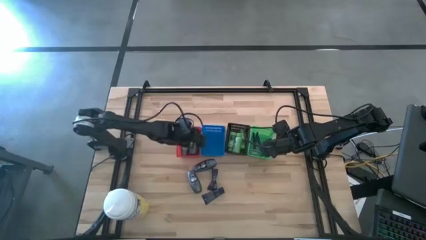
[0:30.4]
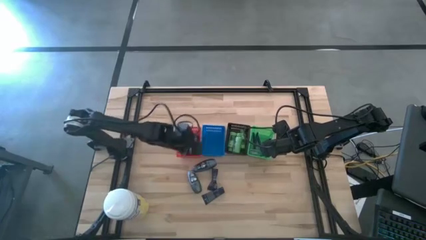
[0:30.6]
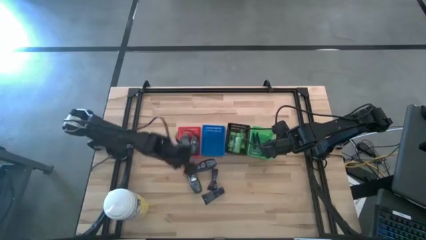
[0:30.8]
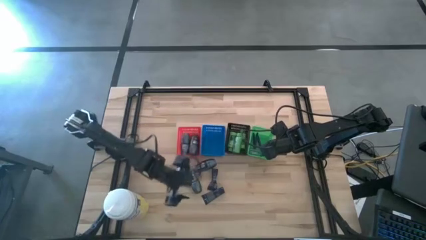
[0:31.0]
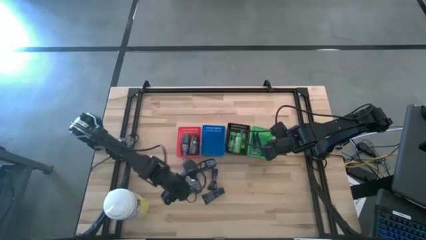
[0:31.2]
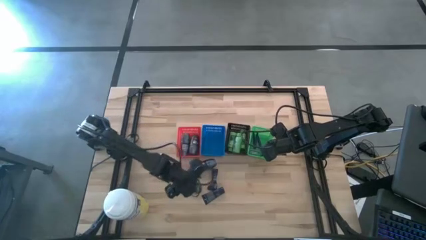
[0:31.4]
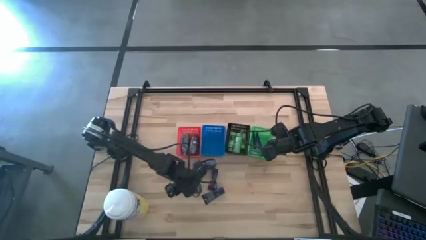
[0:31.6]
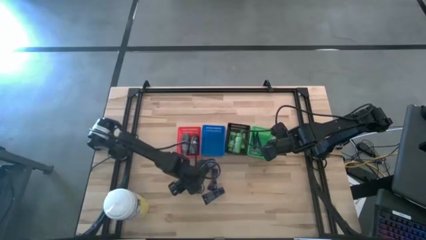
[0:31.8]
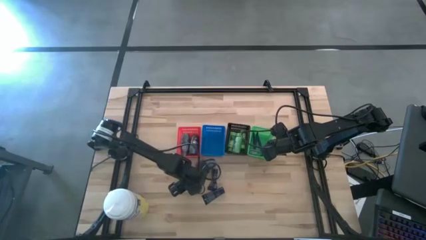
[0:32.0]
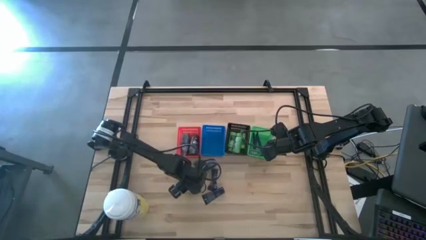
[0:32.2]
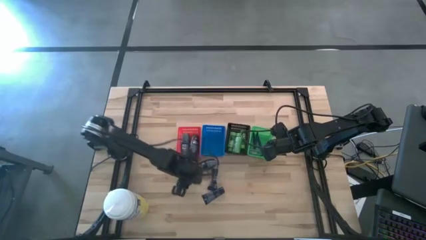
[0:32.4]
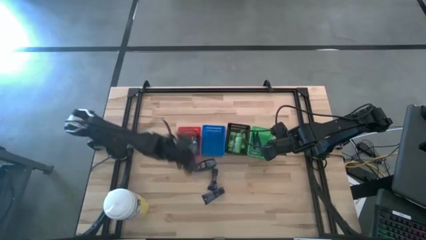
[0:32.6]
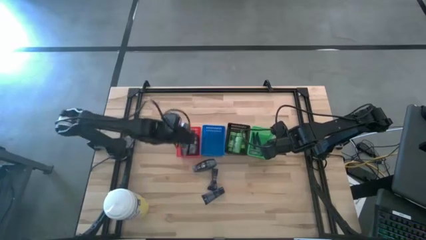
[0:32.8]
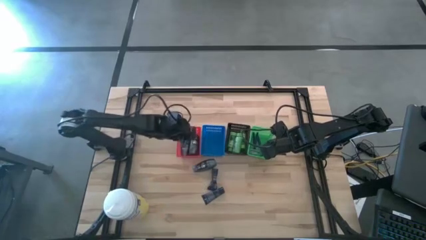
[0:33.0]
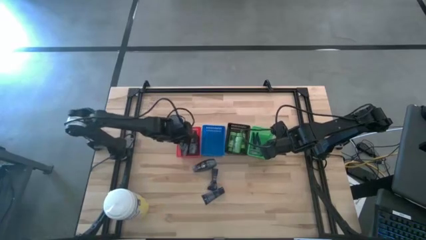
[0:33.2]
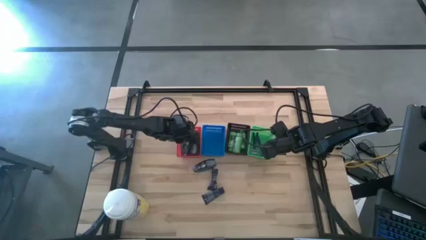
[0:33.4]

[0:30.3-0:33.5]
Task: Pick & Place Travel size toiletries
Put the deodorant into the red bin

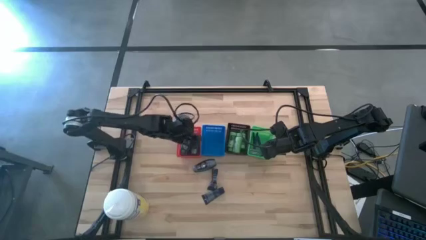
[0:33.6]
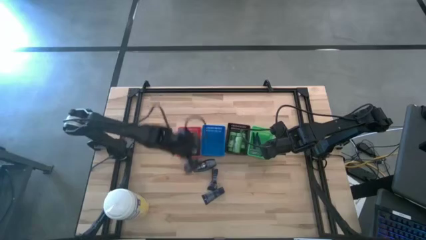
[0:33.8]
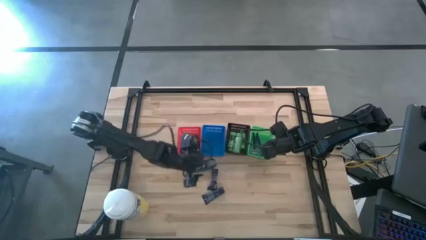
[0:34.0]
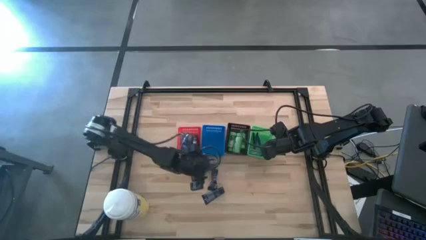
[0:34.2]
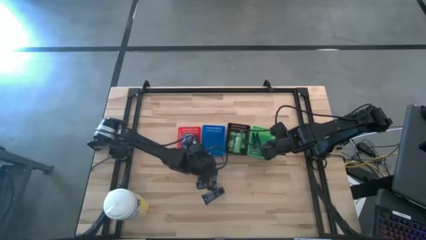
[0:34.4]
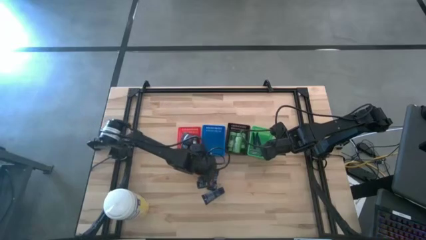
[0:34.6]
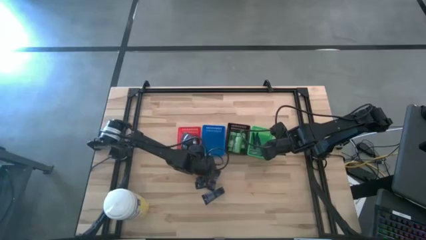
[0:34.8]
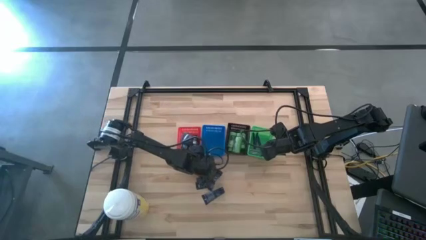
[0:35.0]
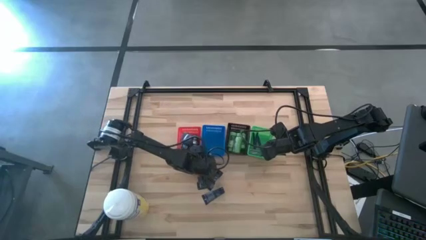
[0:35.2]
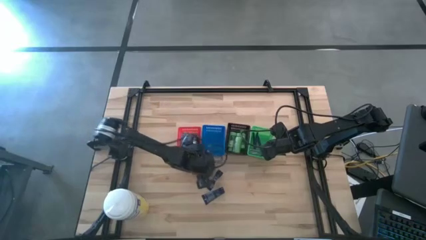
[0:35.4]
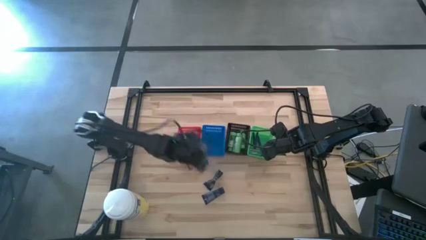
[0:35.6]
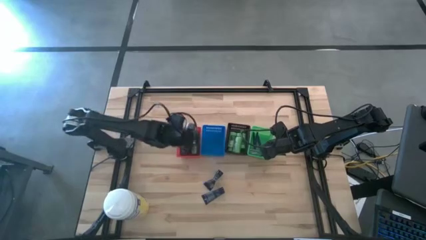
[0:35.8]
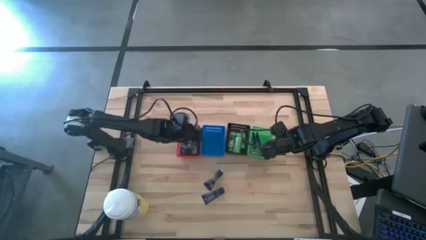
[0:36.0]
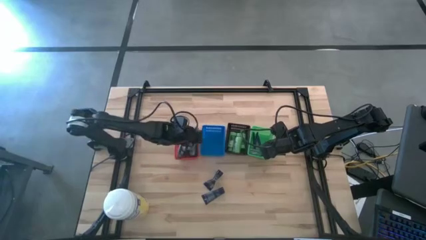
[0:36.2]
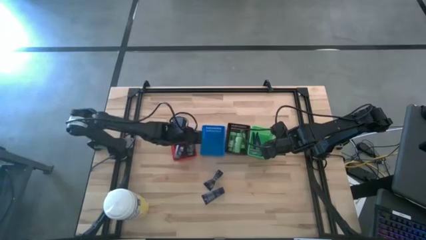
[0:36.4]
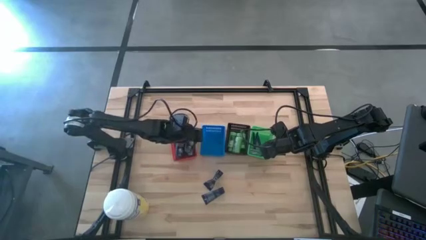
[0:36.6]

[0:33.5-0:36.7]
Put the deodorant into the red bin

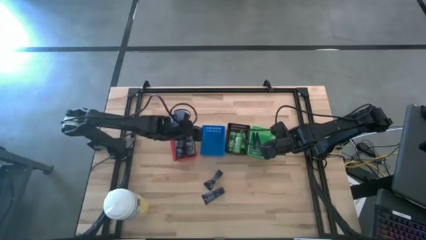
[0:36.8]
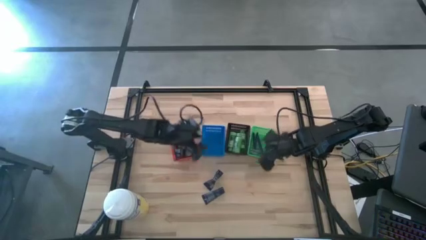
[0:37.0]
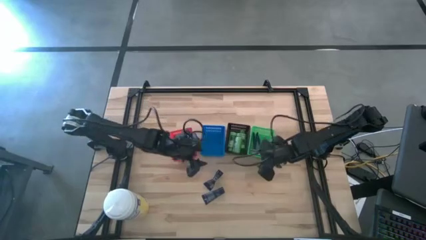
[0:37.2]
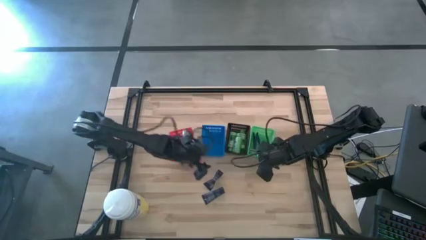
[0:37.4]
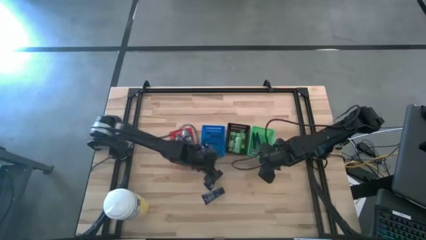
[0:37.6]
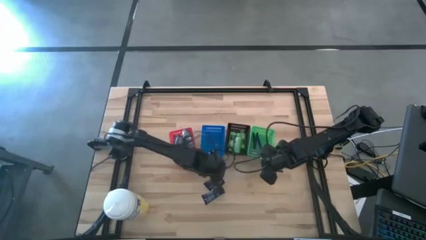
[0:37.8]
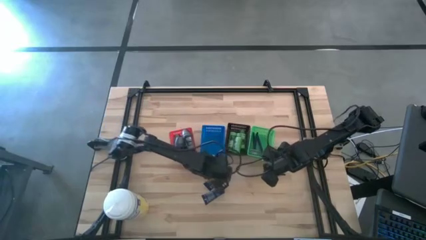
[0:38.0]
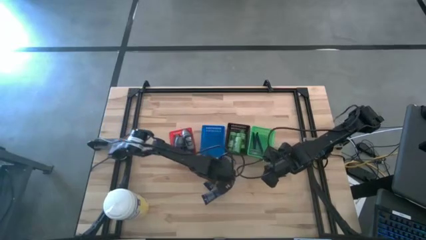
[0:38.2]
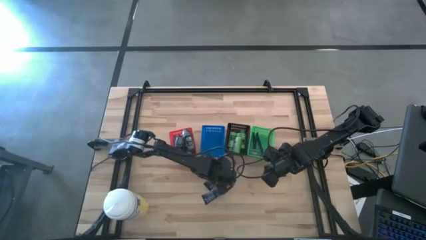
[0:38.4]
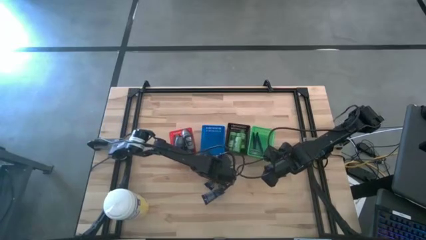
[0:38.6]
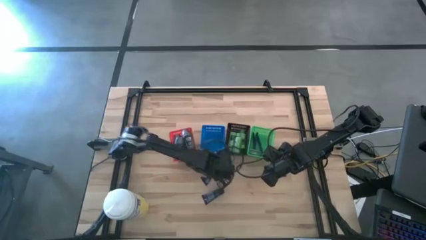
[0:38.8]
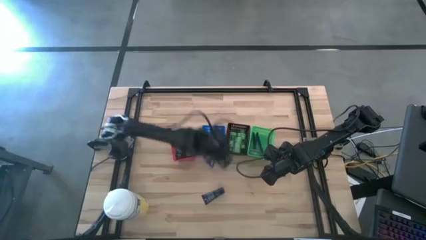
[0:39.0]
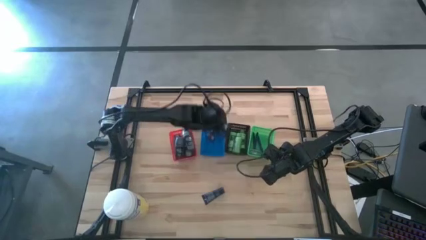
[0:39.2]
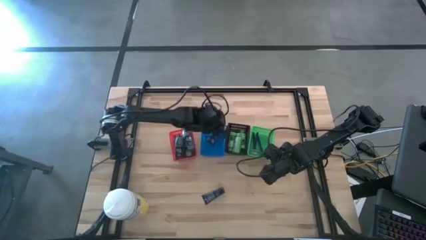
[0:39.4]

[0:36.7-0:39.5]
Put the shave cream into the blue bin

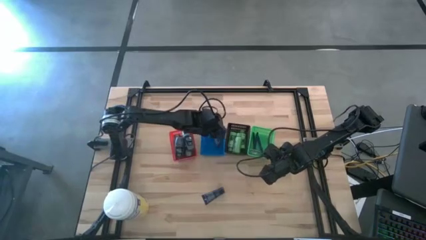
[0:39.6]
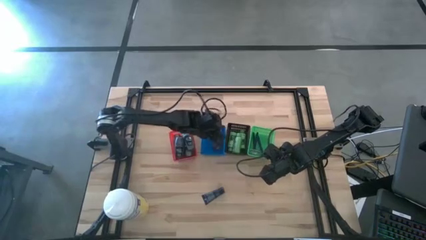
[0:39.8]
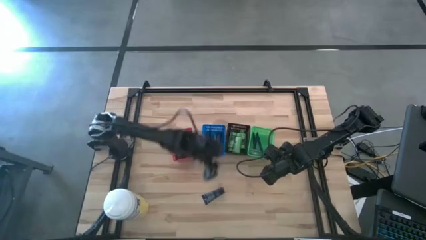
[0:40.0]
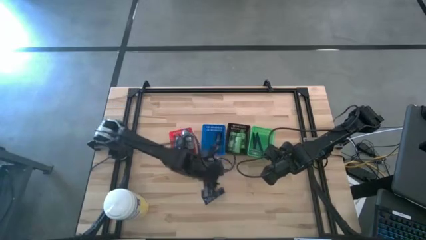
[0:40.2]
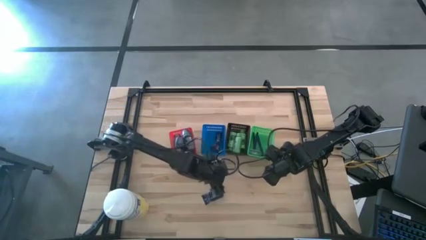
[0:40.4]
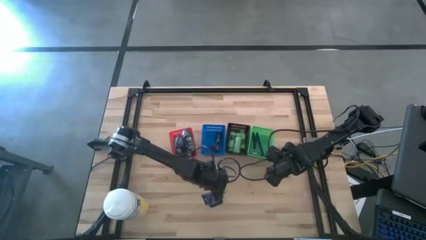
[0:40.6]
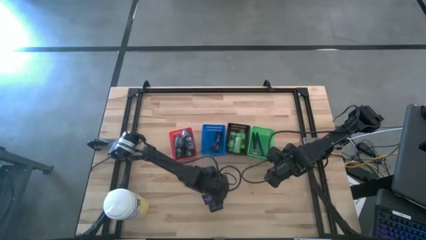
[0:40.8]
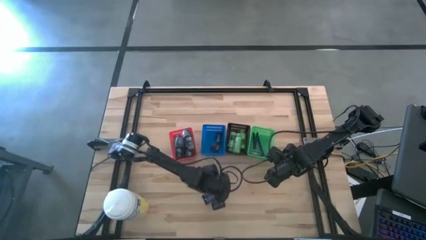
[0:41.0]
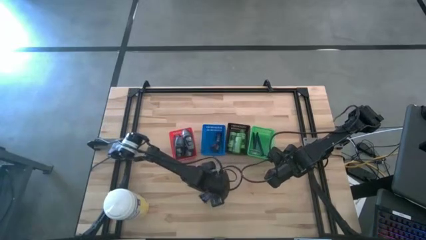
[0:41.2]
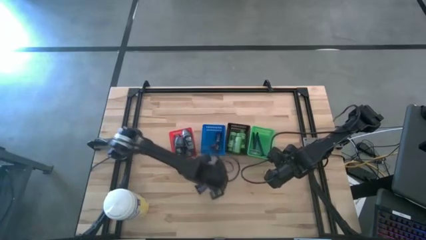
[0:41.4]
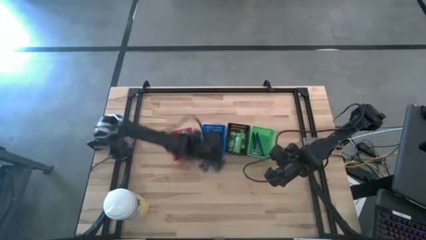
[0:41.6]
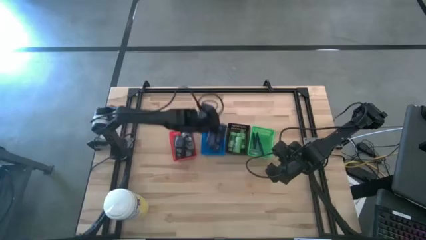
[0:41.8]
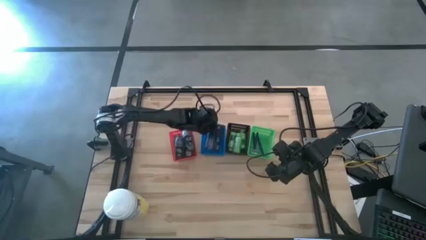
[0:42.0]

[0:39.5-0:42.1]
Put the shave cream into the blue bin

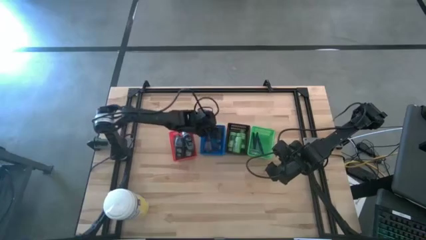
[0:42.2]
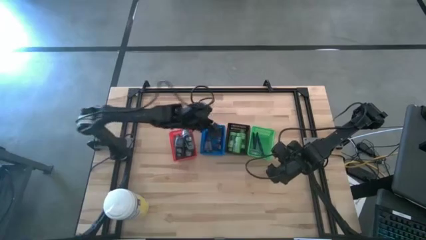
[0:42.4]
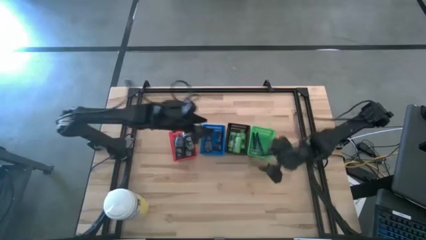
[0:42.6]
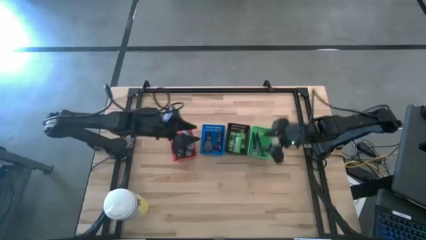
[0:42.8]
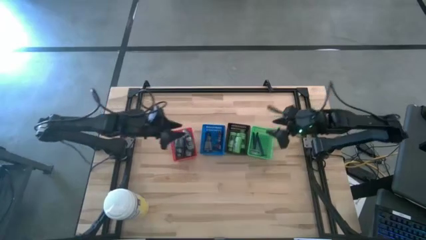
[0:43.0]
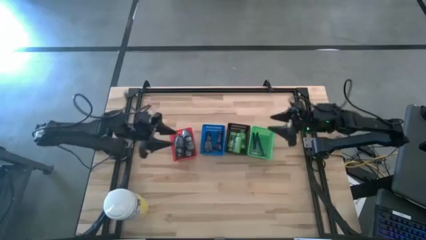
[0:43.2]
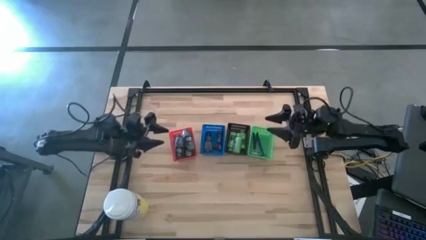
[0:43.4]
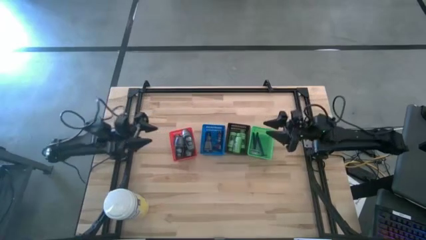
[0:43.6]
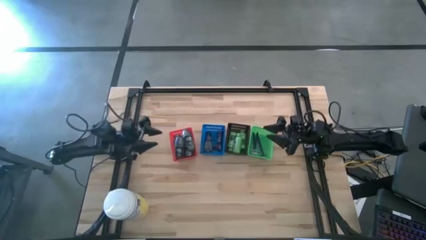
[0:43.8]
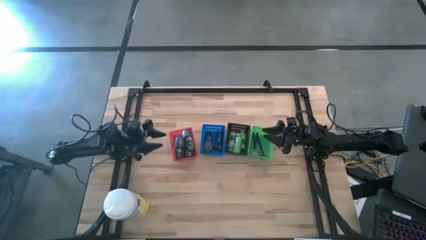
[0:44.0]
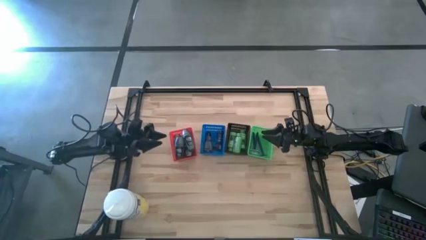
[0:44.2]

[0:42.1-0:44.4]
Return to Home Position

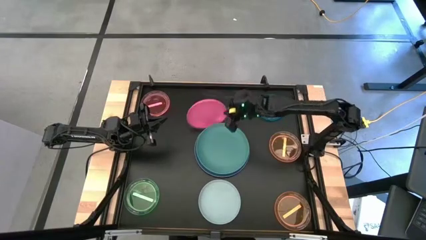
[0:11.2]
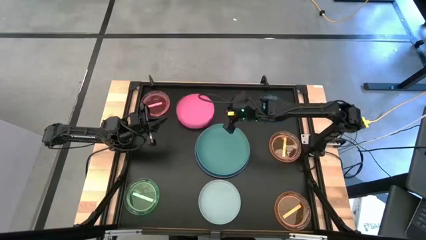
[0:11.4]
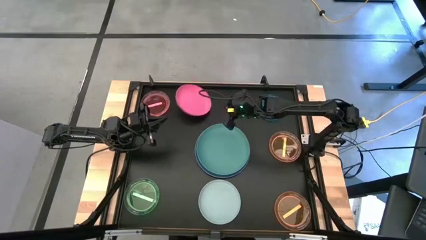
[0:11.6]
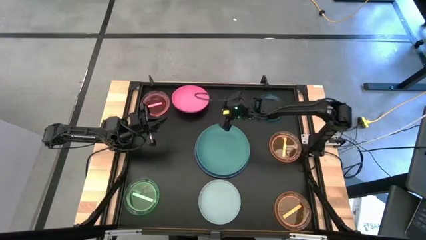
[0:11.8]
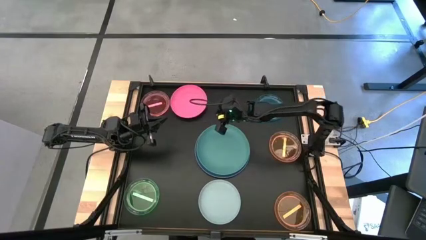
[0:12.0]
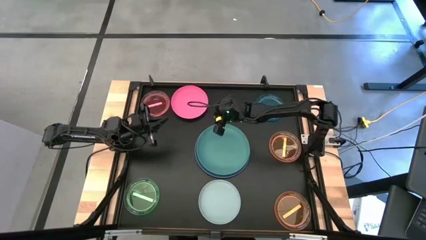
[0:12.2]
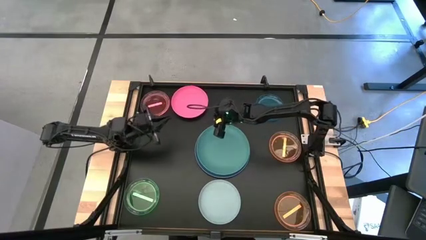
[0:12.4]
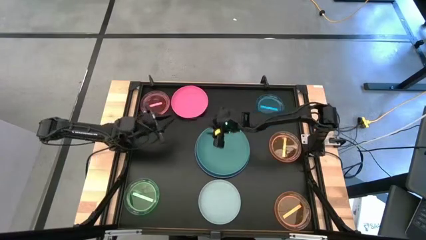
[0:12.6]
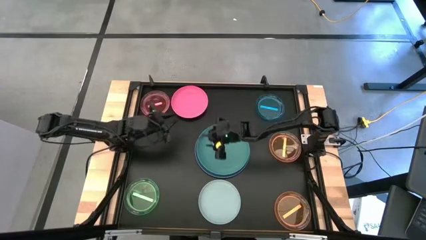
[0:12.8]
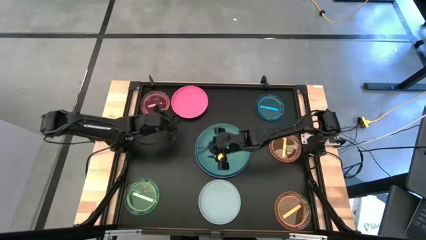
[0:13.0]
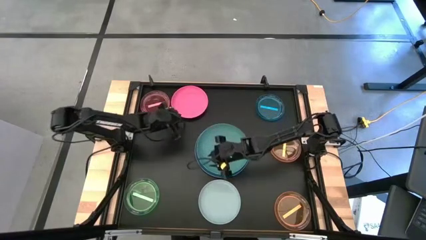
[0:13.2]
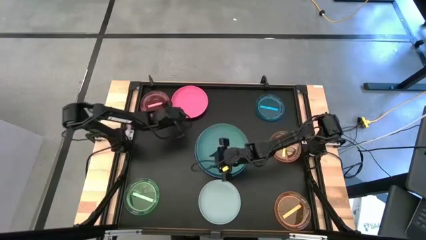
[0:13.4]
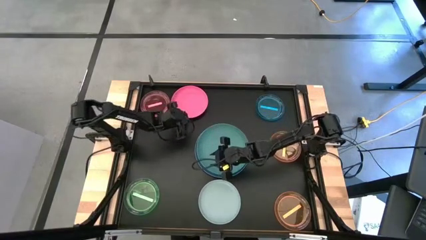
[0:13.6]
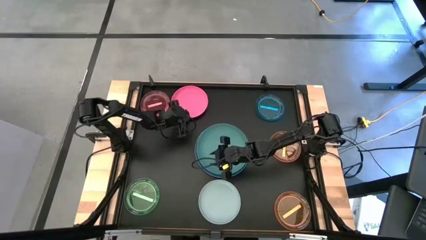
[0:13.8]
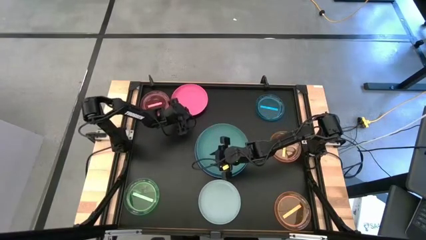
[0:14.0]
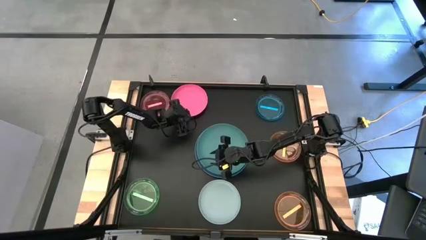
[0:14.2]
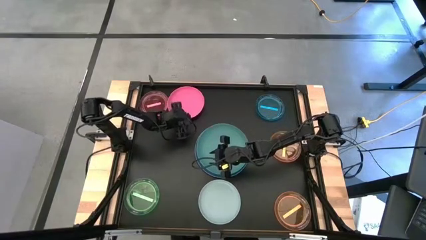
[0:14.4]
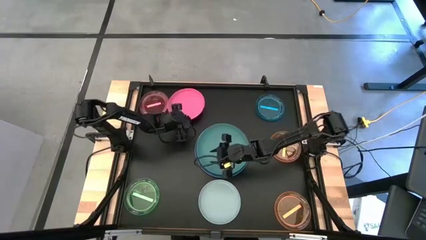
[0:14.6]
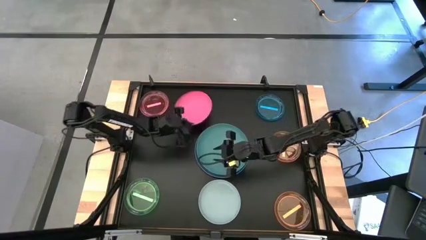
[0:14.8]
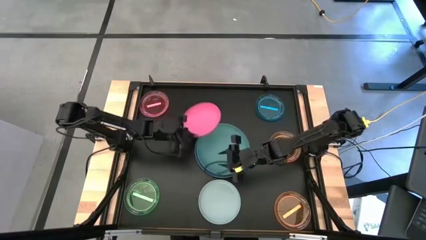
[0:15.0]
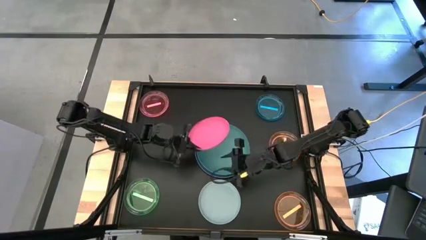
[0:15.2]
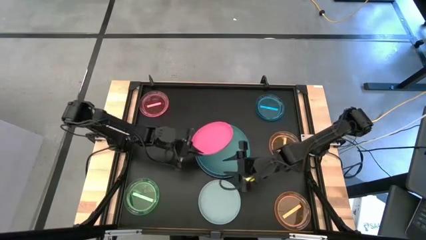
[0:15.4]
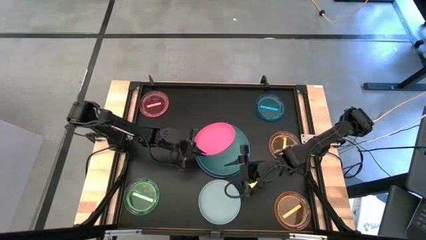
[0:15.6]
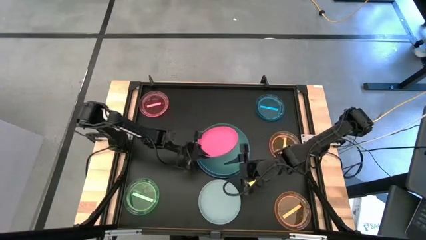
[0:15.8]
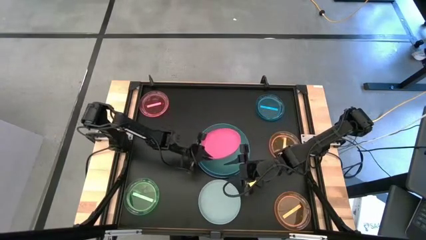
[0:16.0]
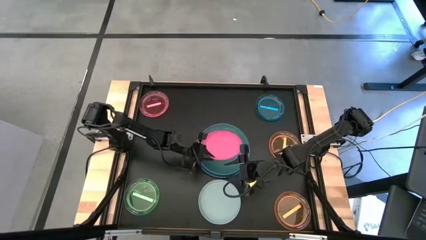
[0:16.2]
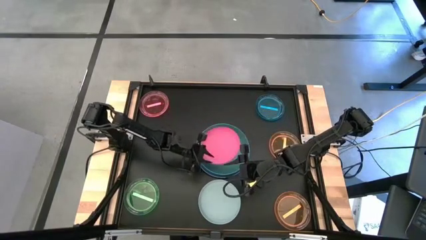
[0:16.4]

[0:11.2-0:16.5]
Task: Stack plastic plates
Stack the right pink plate on top of the green plate
